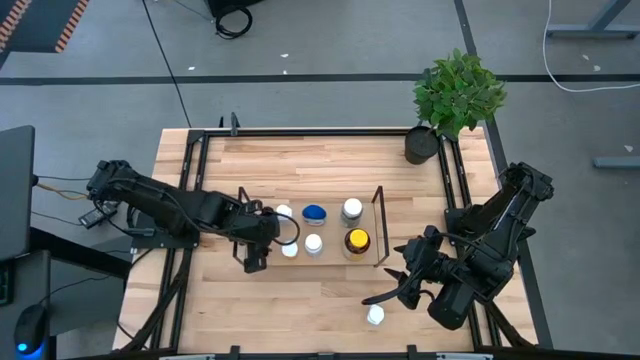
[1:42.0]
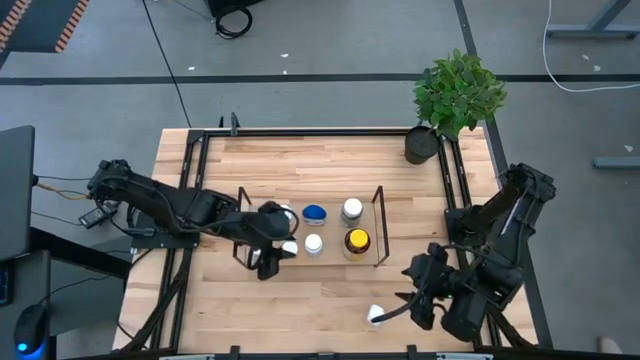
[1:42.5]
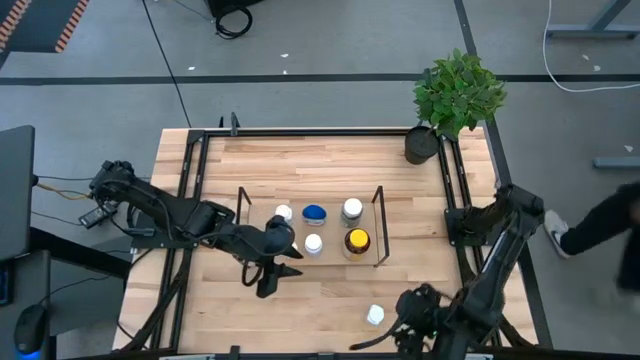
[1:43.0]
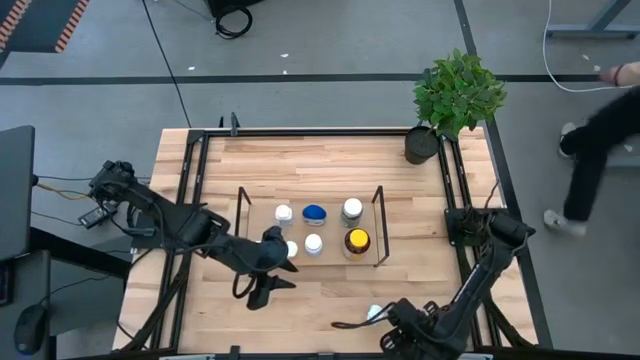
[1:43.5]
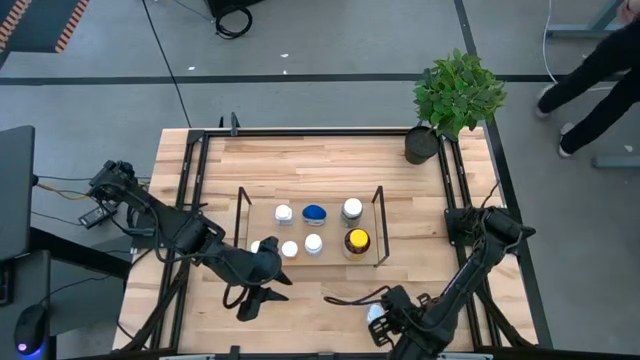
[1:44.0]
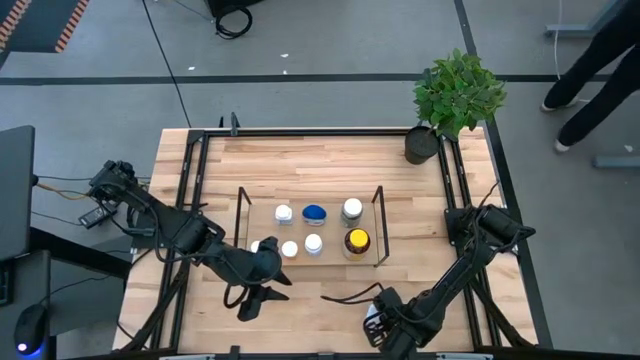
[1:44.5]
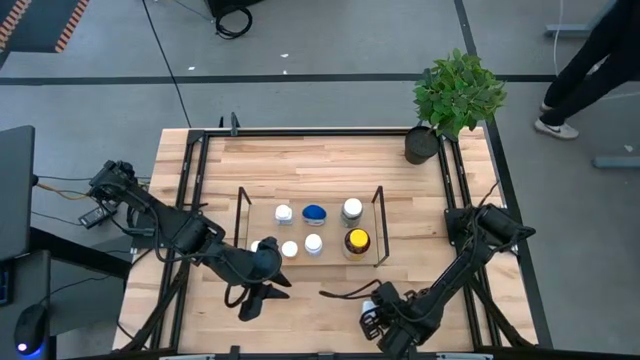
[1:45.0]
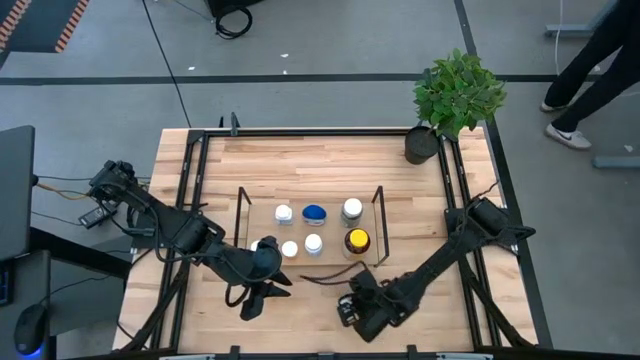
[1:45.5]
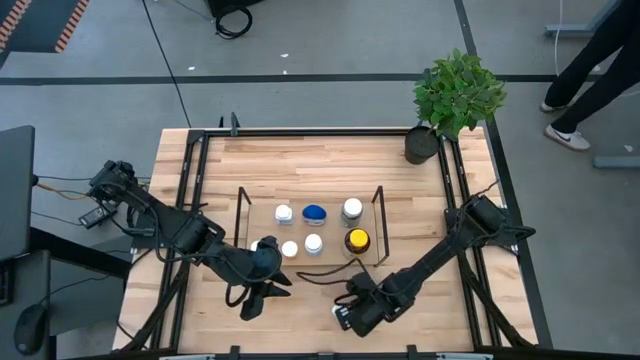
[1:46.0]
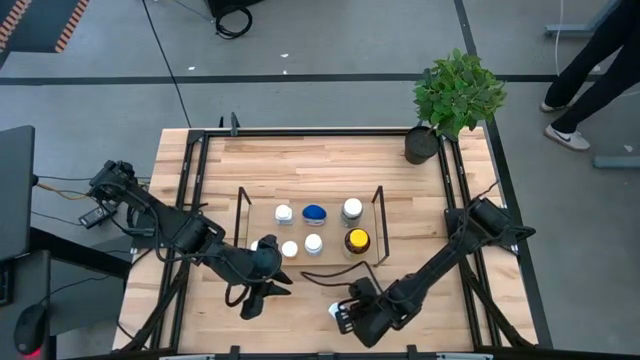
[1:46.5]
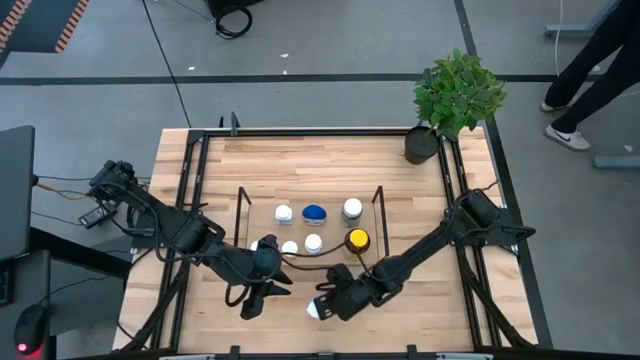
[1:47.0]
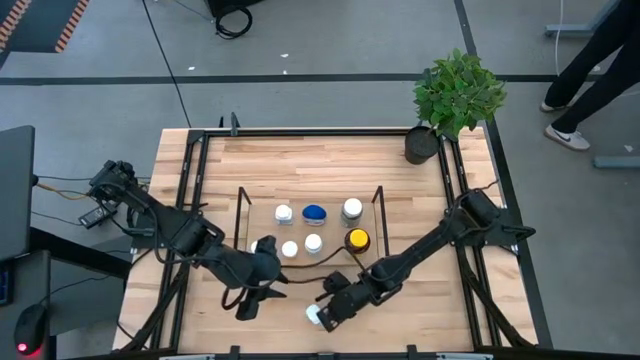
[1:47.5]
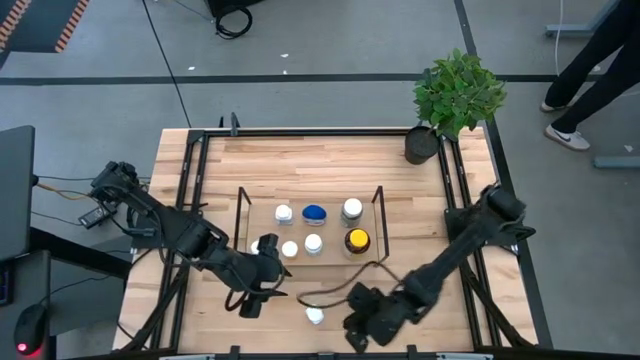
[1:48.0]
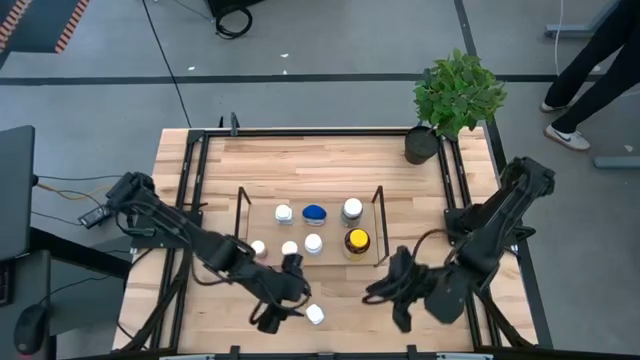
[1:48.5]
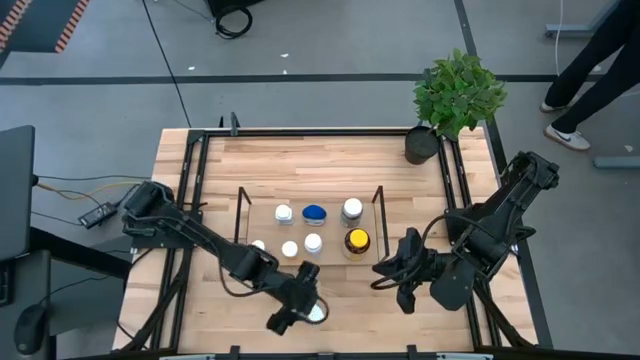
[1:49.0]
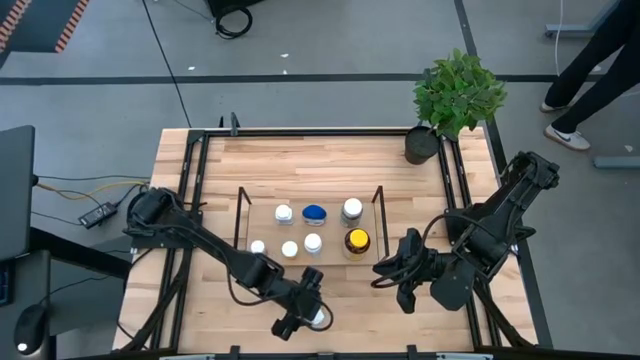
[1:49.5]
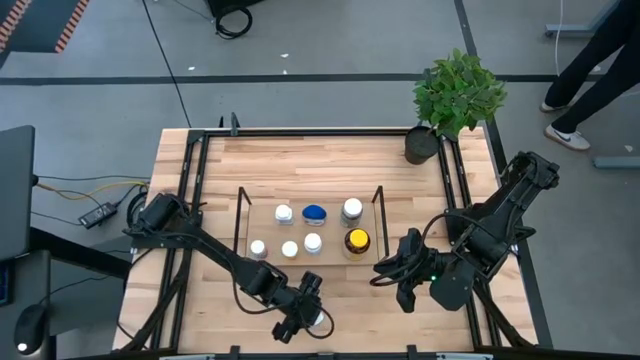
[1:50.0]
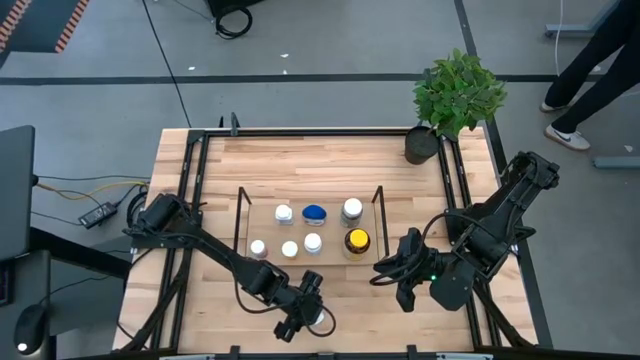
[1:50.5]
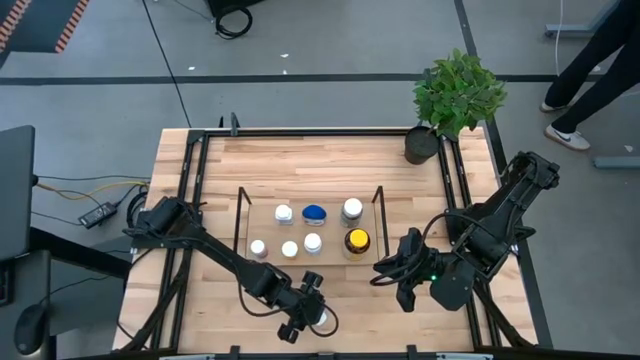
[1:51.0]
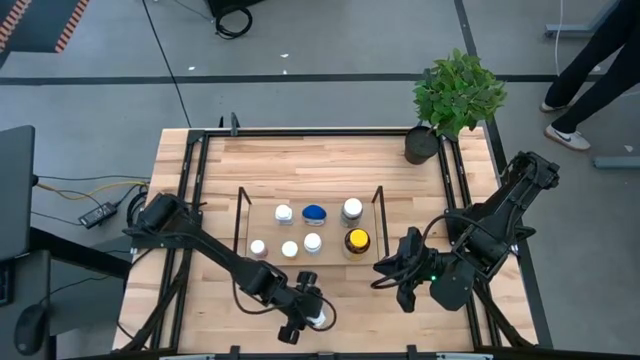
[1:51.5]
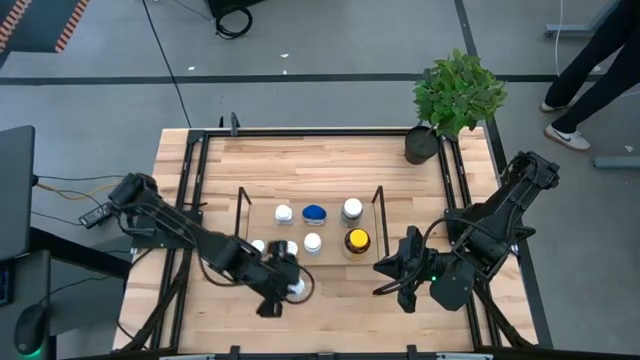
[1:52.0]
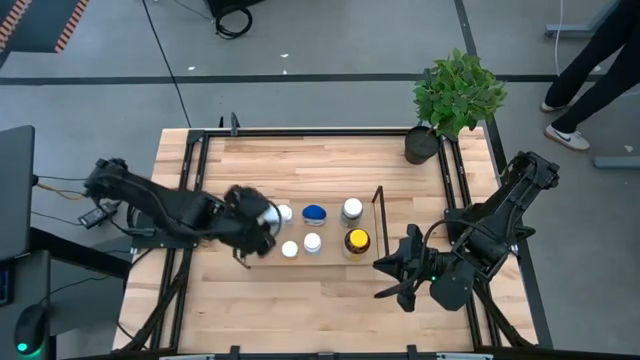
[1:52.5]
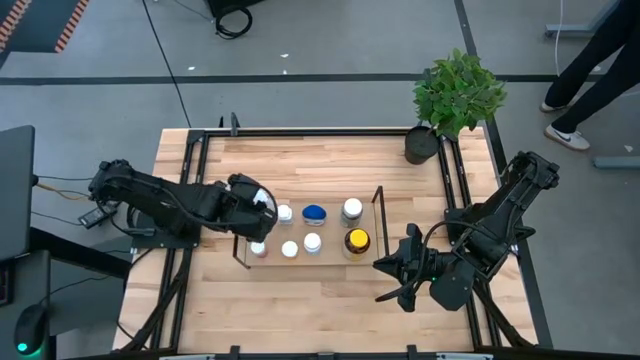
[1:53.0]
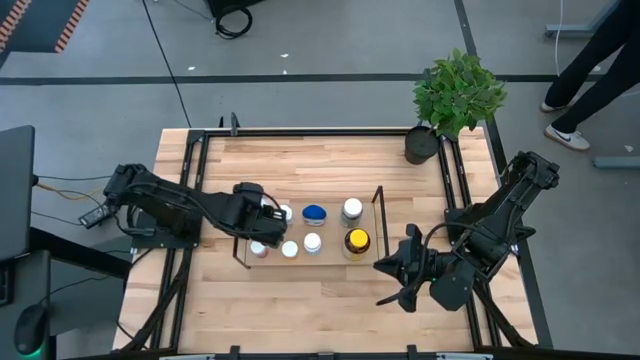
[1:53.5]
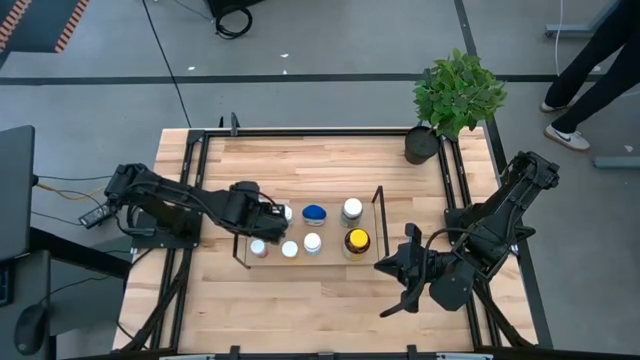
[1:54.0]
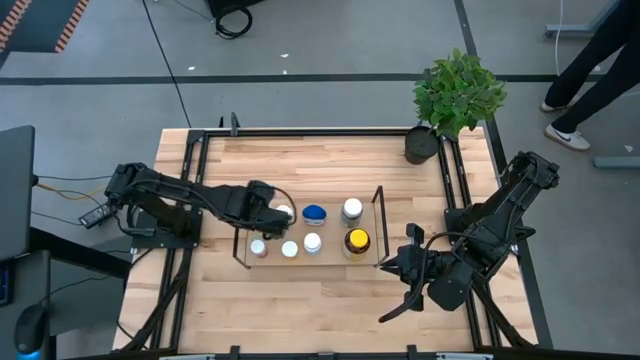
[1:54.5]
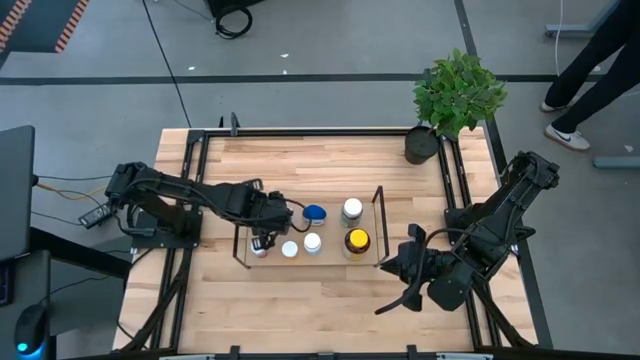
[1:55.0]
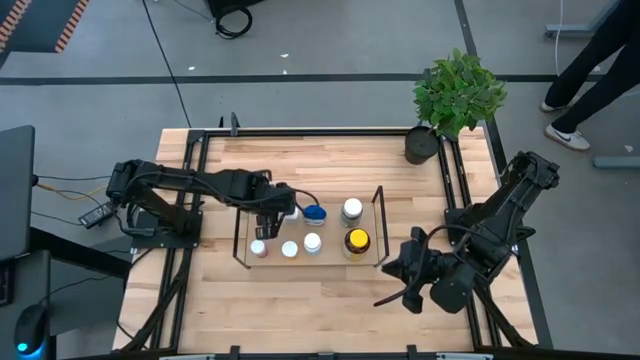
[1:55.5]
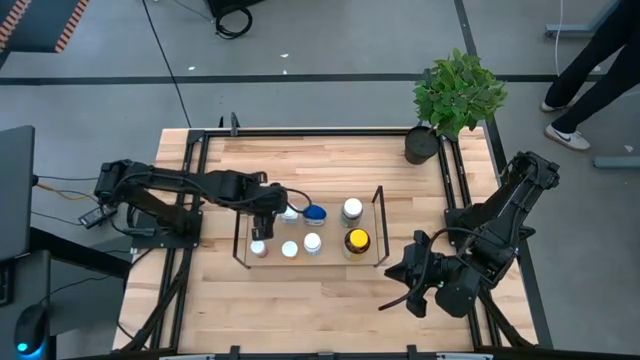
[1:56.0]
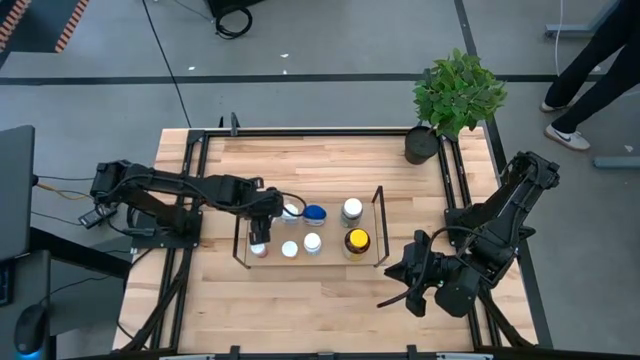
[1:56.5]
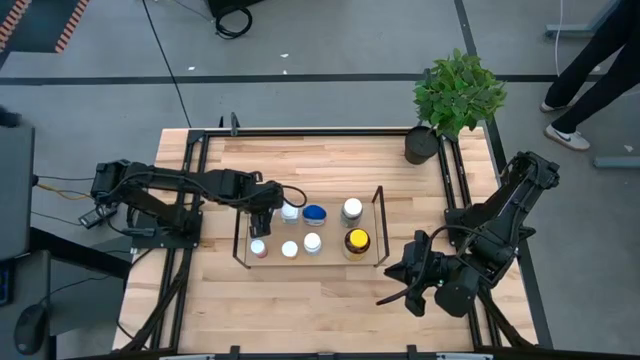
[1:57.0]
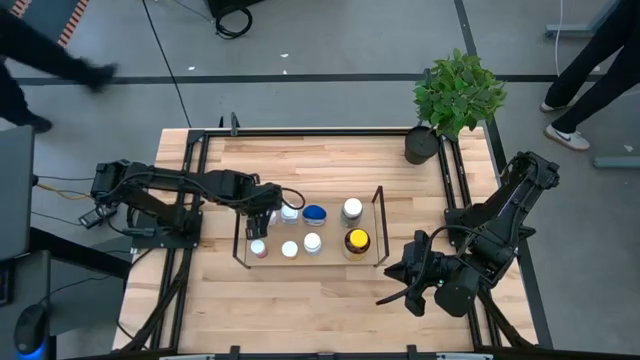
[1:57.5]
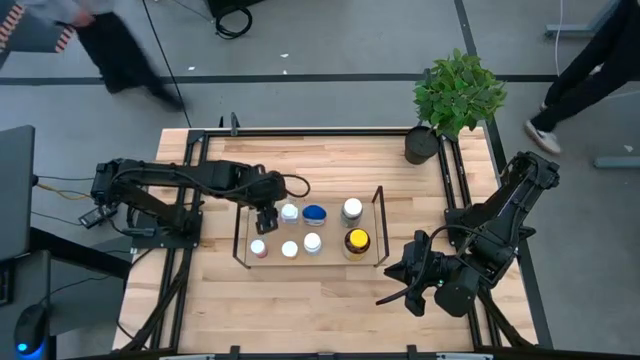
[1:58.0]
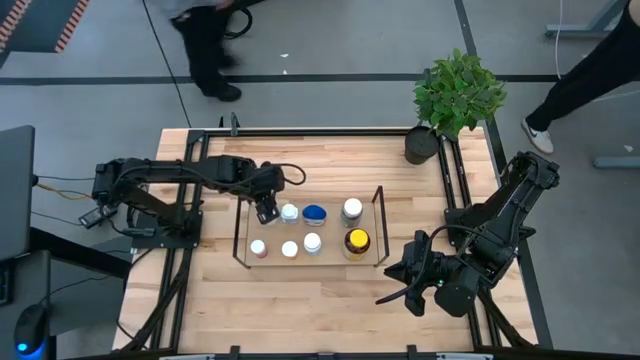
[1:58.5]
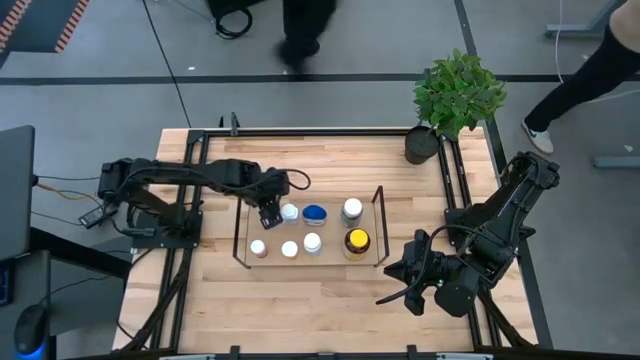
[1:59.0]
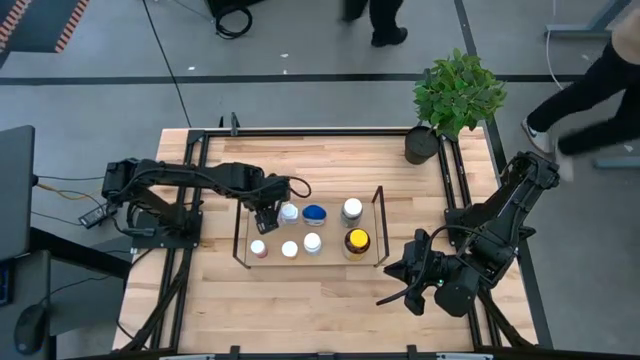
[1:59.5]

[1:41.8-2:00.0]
Task: Pick and place medicine bottles onto shelf by color
Put the white and blue medicine bottle on the shelf

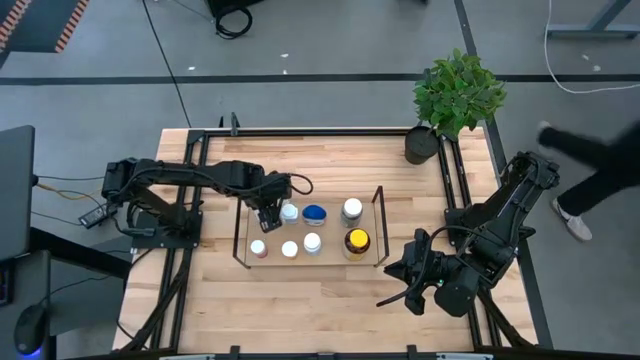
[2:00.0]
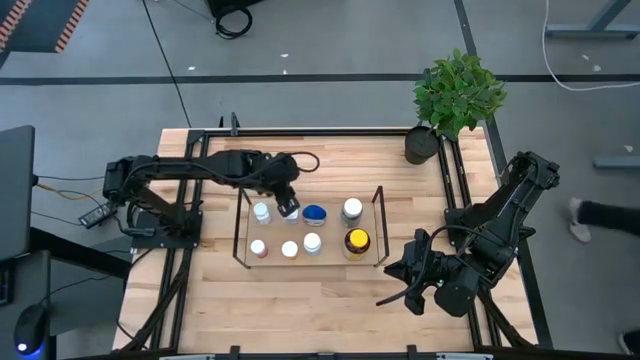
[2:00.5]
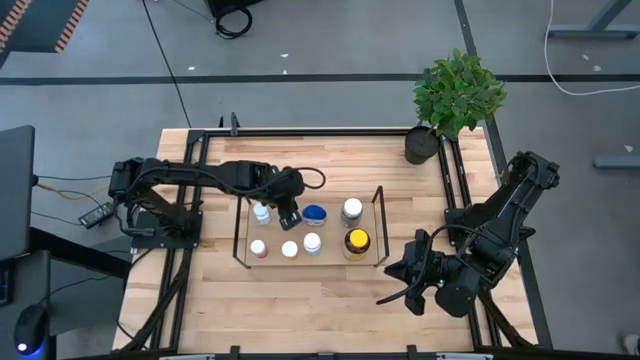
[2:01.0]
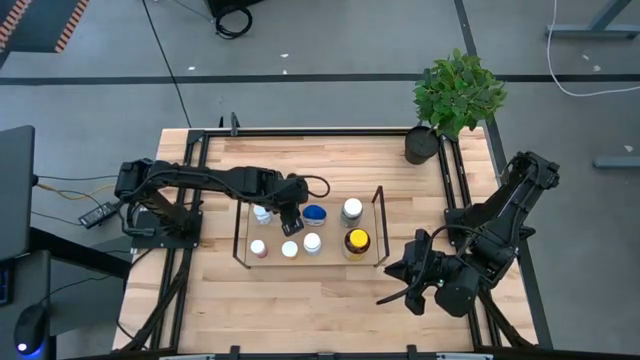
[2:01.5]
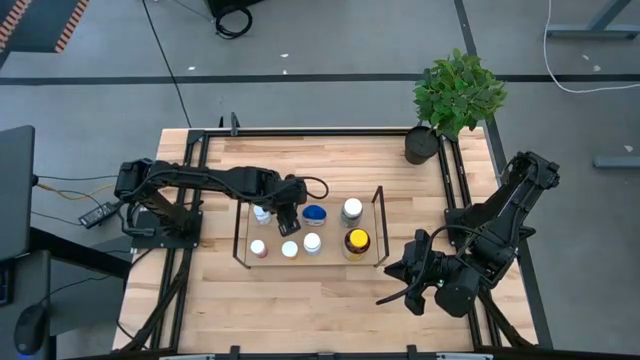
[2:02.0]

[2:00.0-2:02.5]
Adjust the white and blue medicine bottle on the shelf
